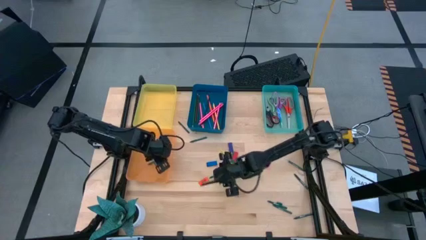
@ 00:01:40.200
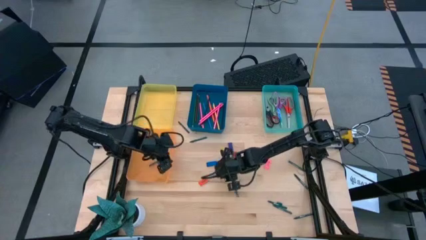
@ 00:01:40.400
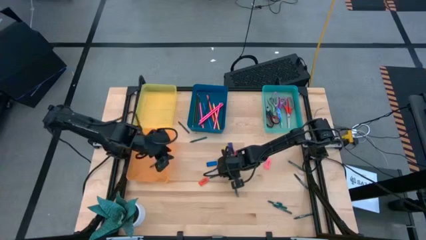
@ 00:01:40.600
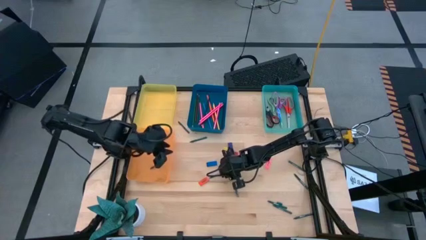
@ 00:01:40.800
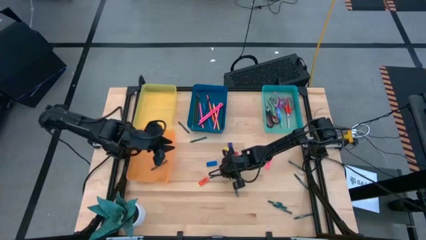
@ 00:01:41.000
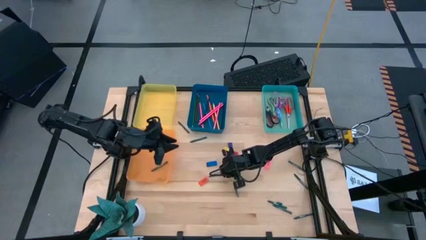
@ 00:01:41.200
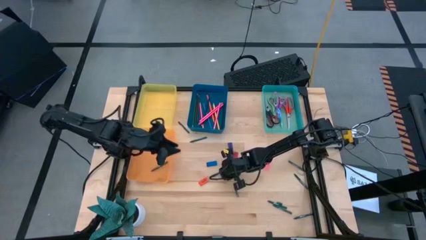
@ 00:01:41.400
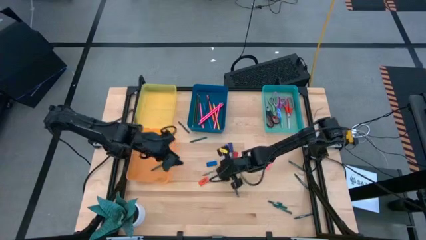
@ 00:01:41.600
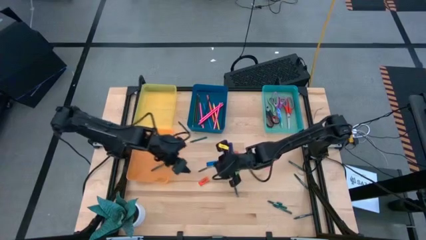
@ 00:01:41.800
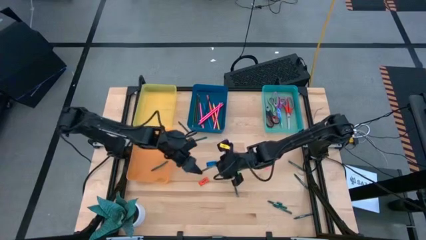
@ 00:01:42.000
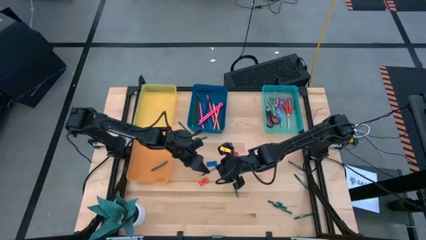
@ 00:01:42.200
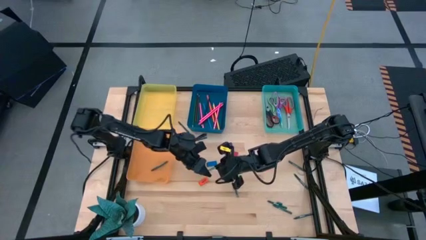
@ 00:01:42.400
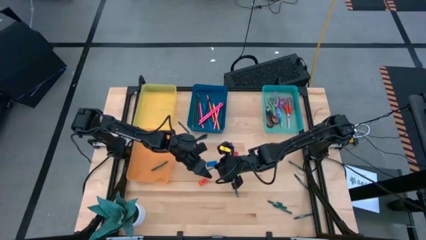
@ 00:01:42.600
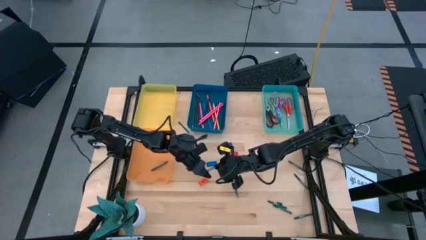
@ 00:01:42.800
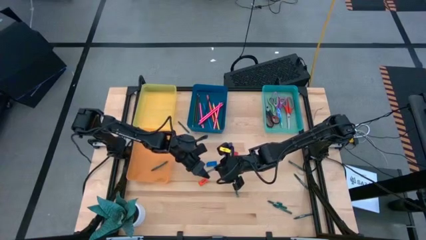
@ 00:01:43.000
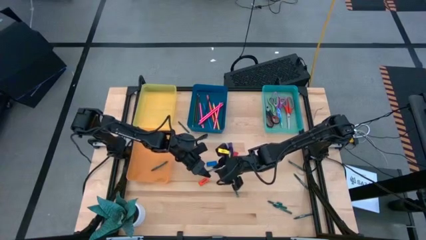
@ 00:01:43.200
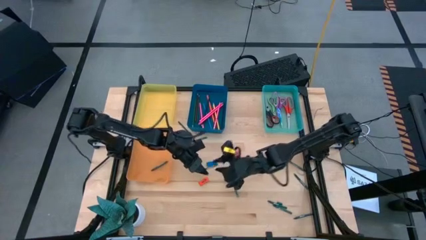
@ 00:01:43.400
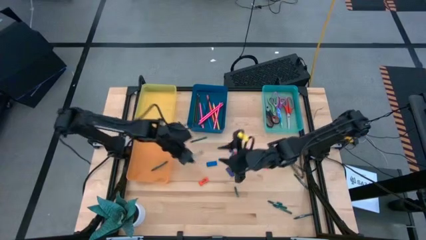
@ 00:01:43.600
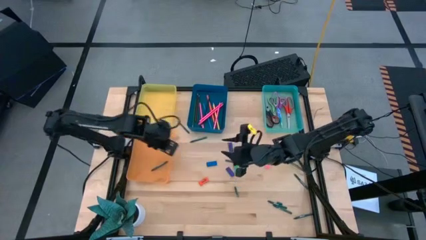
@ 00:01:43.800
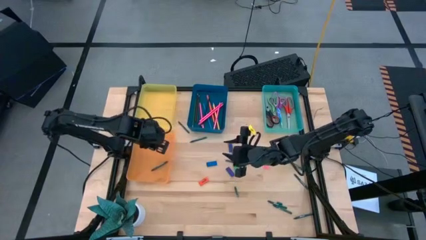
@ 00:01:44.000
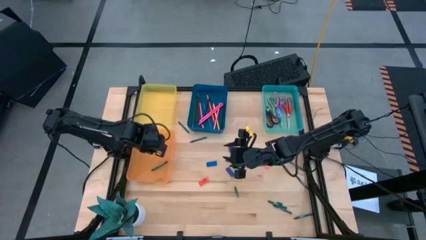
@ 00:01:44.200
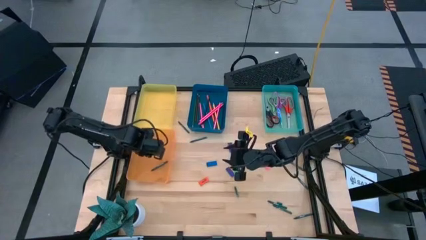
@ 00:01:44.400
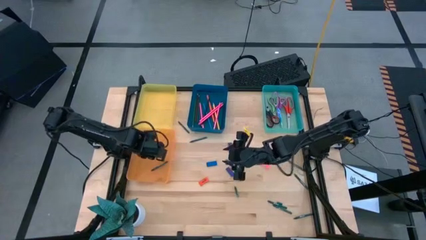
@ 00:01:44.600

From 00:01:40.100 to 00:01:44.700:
Task: Sort crayons/erasers/pens/pencils in bins
Put the green crayon into the orange bin

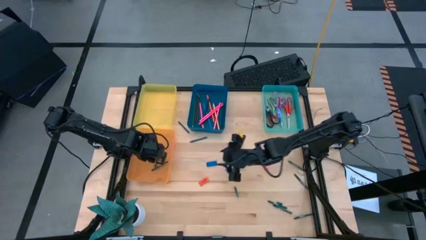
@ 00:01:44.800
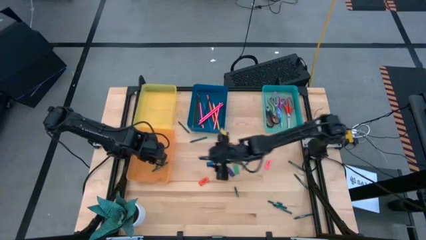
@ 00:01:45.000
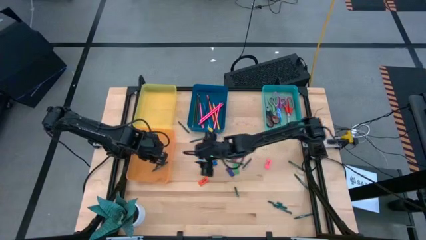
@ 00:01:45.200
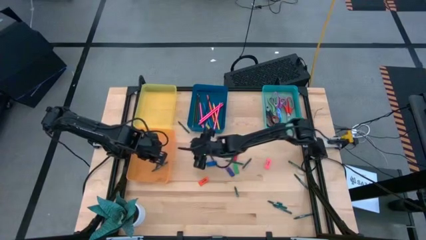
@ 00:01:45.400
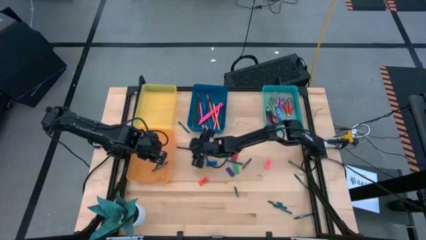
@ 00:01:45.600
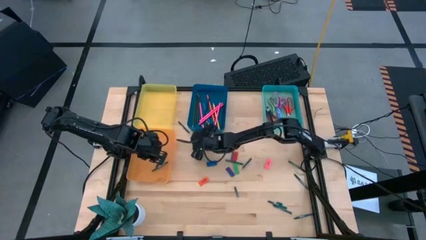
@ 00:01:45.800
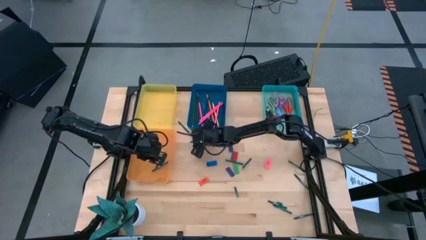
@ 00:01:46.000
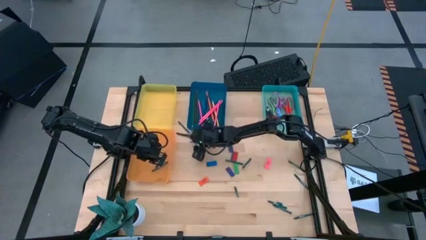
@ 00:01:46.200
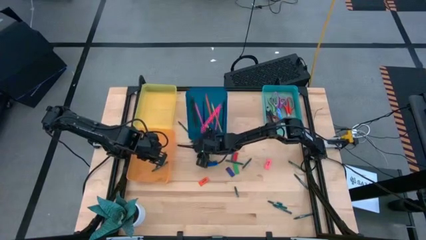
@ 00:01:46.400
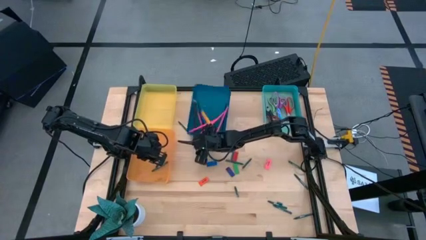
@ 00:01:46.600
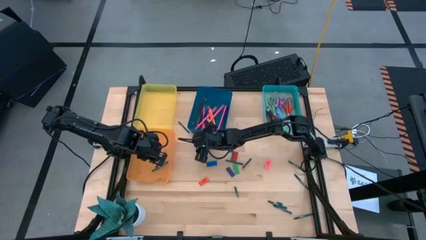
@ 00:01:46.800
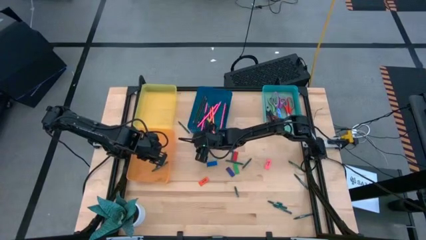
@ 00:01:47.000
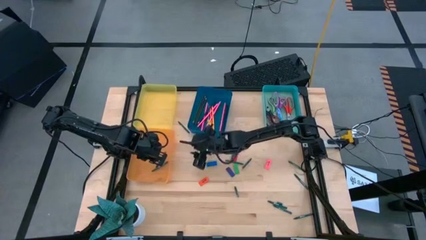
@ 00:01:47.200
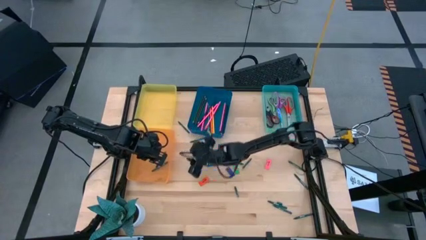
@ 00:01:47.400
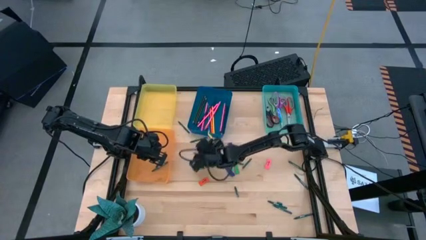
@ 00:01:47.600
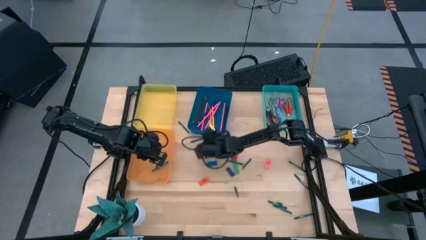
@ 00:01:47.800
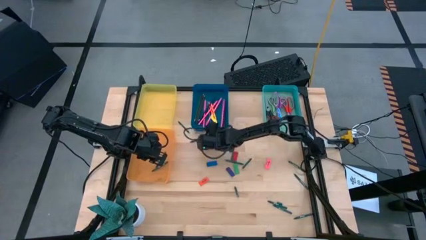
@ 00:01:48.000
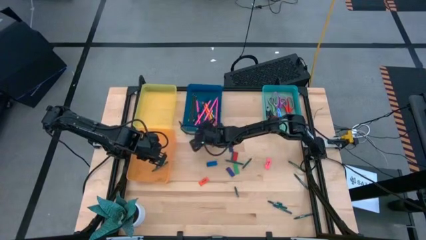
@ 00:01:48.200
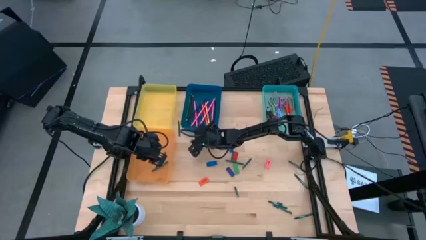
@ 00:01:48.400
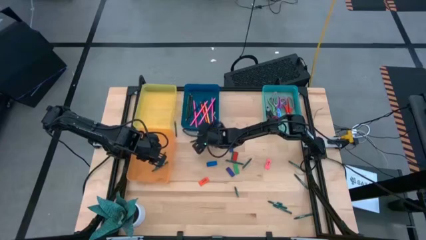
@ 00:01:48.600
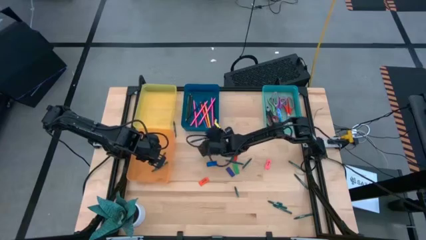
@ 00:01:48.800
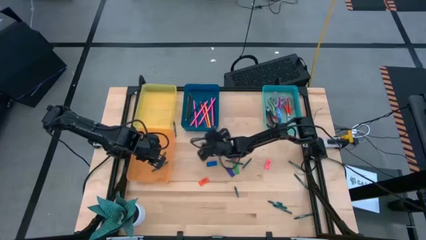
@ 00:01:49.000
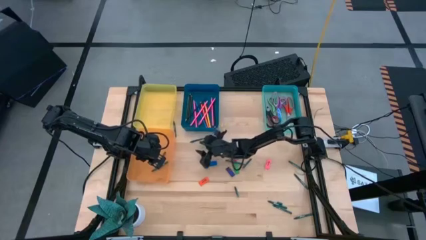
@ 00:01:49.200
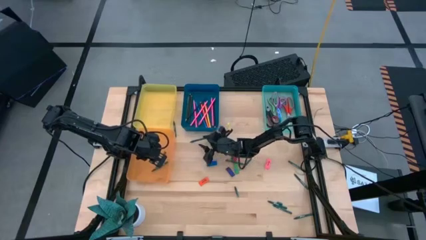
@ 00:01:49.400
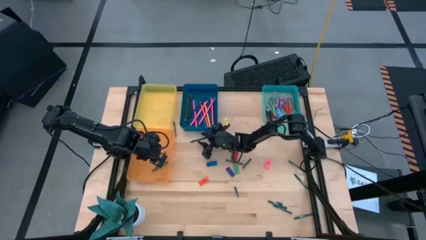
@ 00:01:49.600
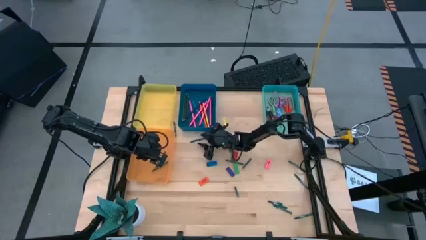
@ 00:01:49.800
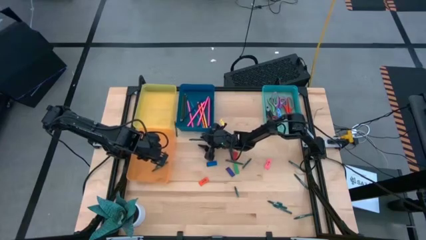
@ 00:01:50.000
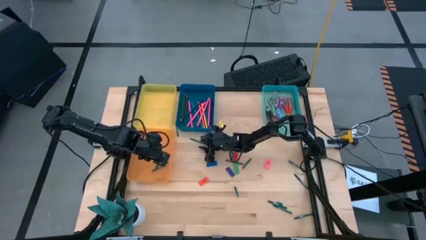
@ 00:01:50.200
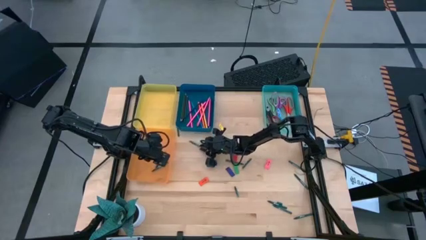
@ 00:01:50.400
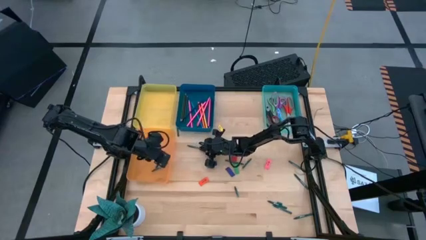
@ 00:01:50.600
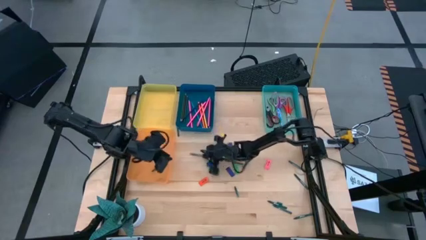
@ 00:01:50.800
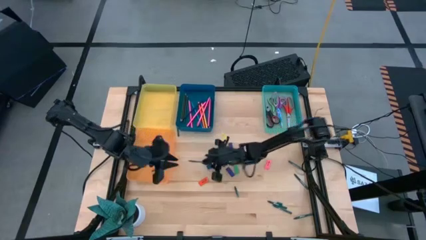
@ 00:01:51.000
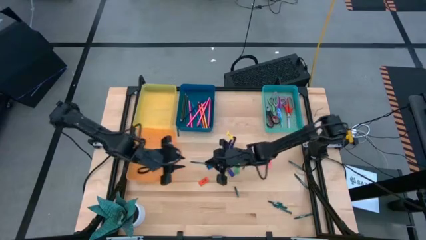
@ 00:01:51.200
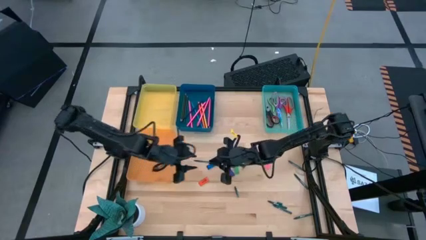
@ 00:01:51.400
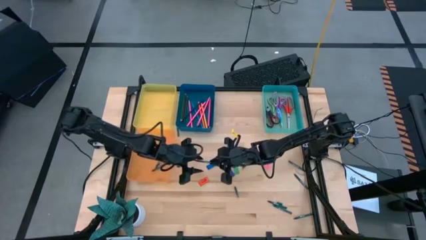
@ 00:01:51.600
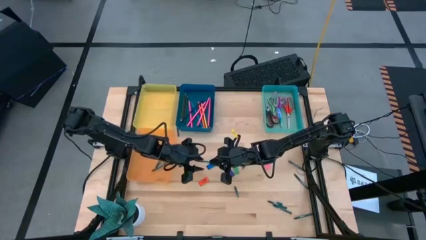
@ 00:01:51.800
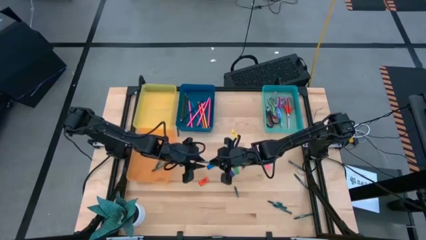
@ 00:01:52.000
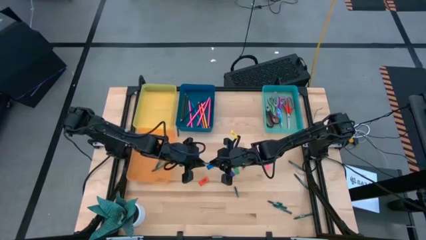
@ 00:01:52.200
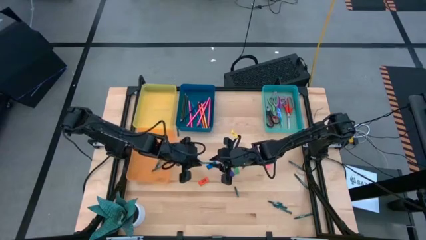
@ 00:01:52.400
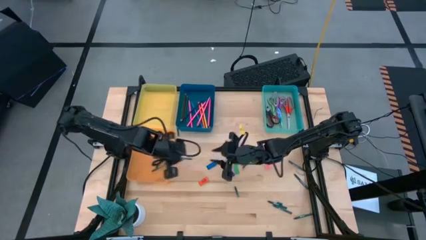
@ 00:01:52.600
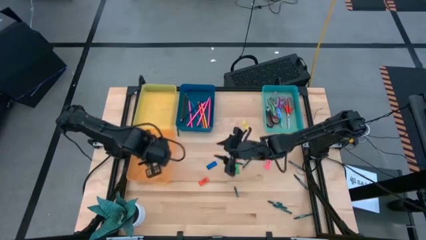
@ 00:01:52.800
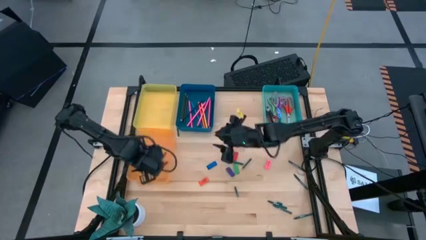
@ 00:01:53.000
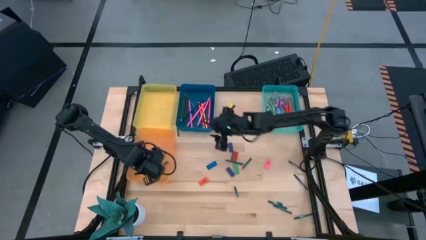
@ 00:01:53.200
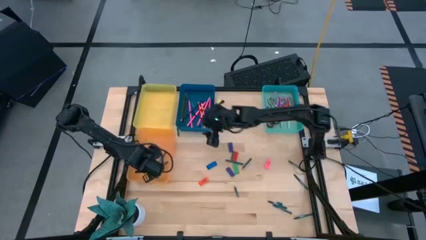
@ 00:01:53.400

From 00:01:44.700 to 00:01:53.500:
Put the green crayon into the orange bin

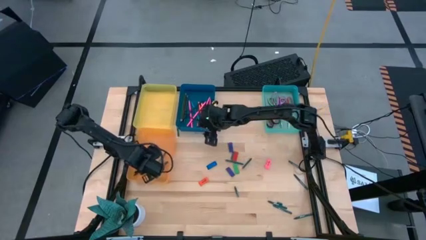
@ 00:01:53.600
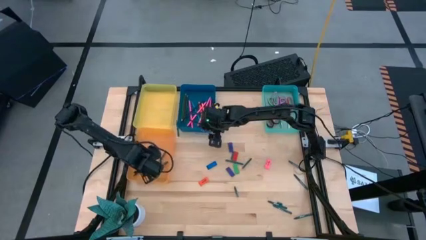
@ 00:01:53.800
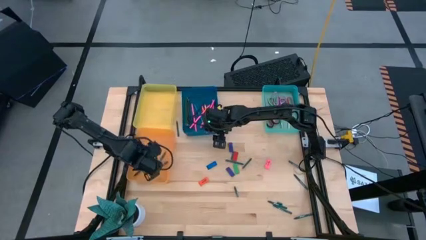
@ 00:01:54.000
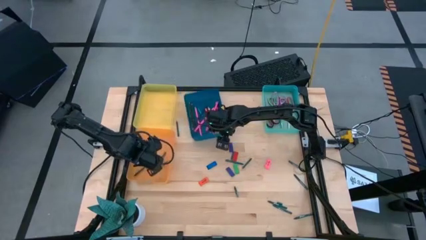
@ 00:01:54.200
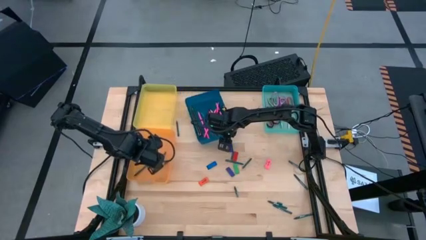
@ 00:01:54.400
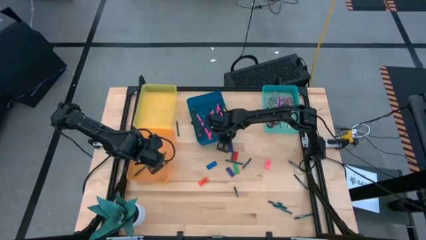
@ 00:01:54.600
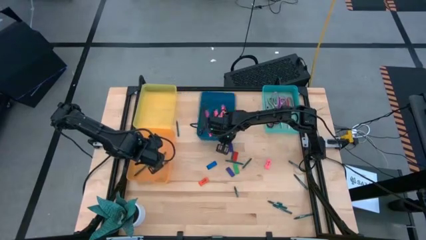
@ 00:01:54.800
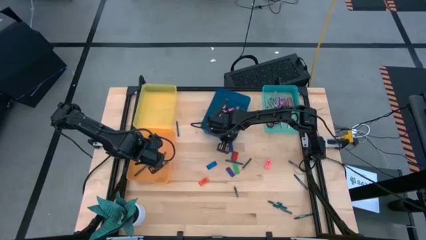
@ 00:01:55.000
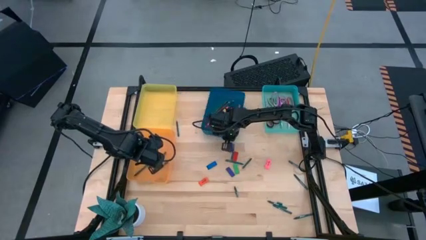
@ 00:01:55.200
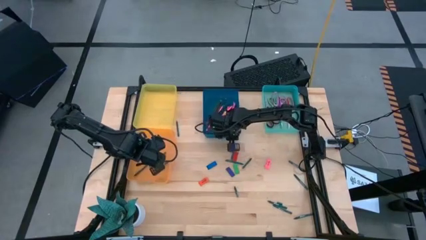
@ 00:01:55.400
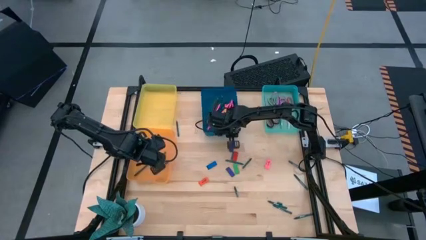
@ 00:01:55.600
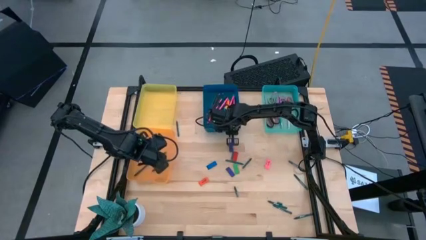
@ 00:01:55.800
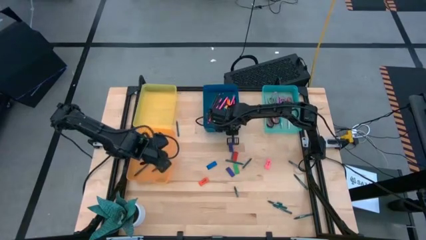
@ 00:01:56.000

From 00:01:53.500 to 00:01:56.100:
Adjust the blue bin
